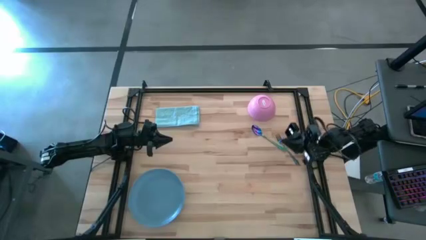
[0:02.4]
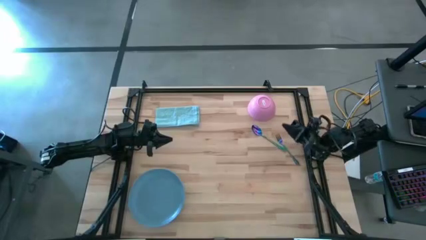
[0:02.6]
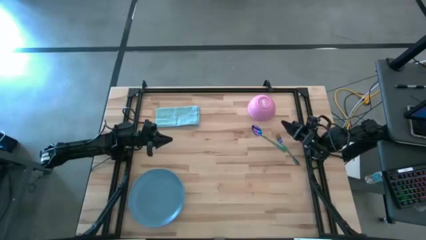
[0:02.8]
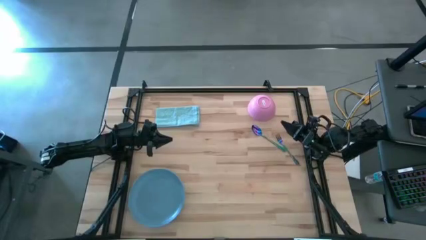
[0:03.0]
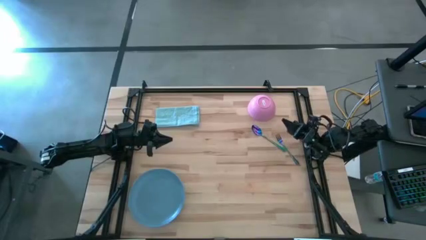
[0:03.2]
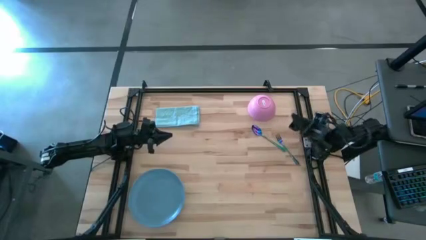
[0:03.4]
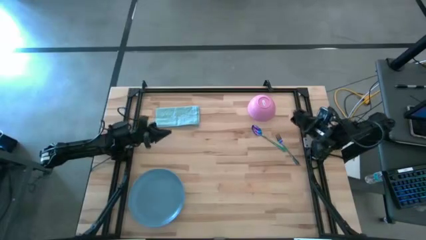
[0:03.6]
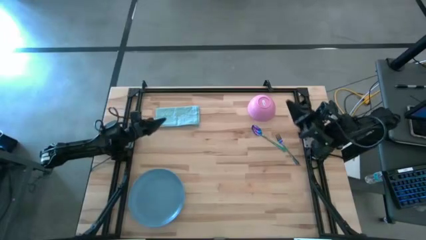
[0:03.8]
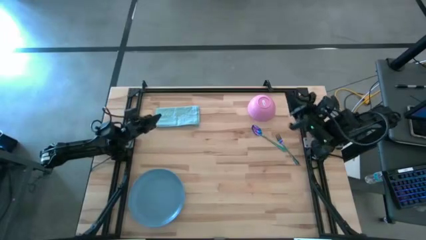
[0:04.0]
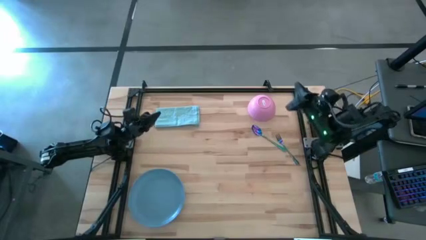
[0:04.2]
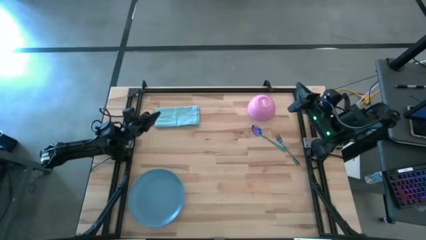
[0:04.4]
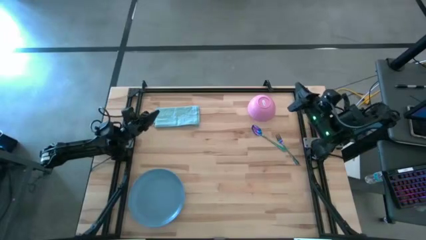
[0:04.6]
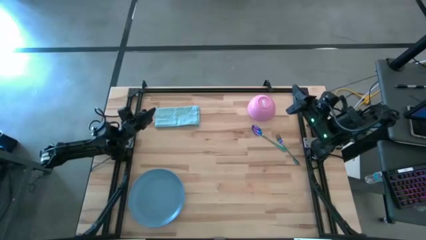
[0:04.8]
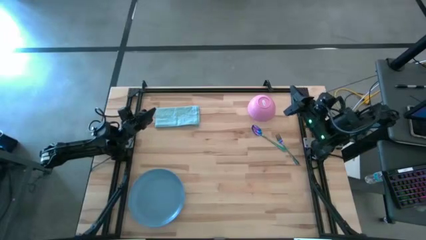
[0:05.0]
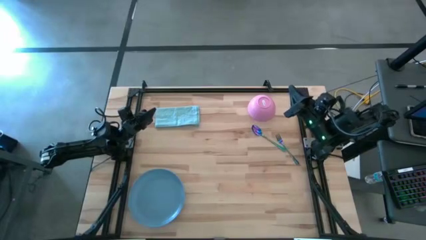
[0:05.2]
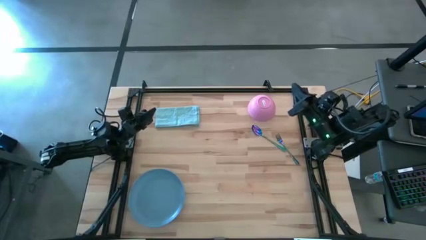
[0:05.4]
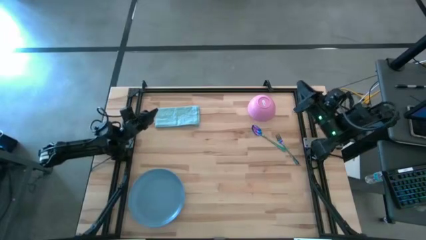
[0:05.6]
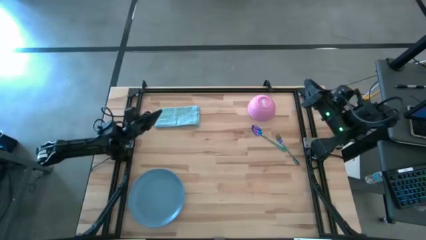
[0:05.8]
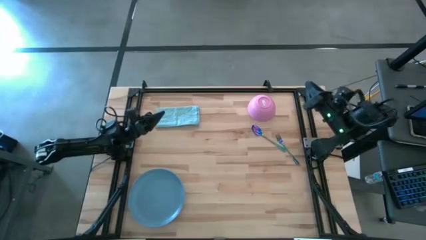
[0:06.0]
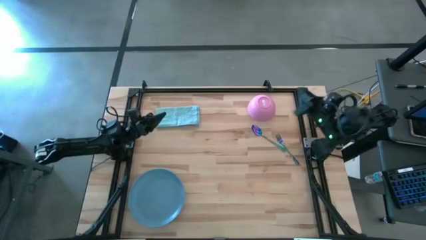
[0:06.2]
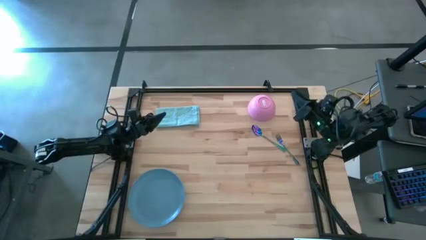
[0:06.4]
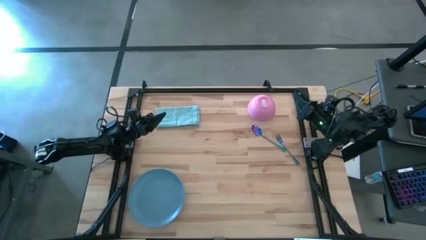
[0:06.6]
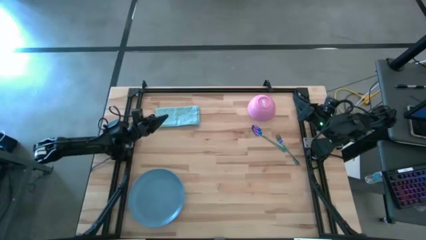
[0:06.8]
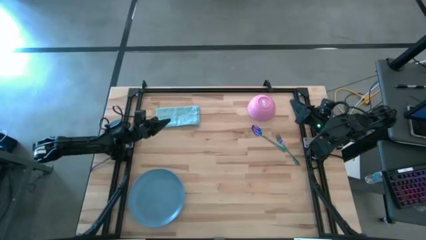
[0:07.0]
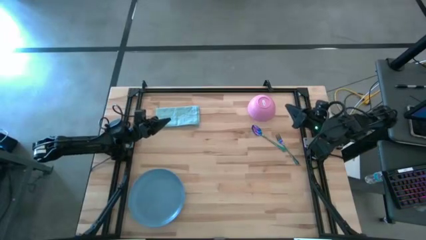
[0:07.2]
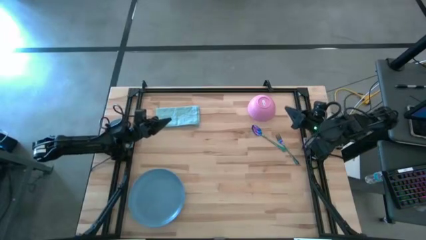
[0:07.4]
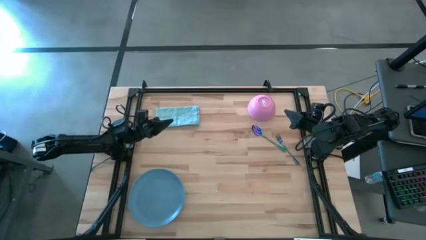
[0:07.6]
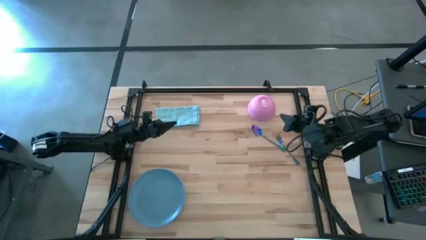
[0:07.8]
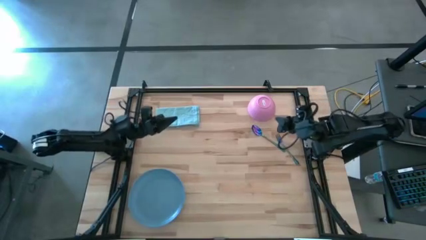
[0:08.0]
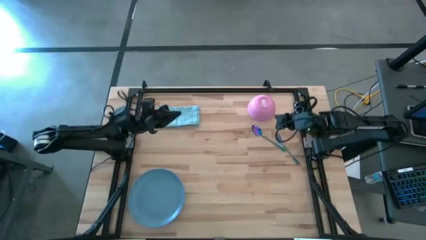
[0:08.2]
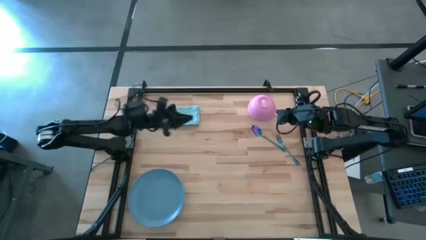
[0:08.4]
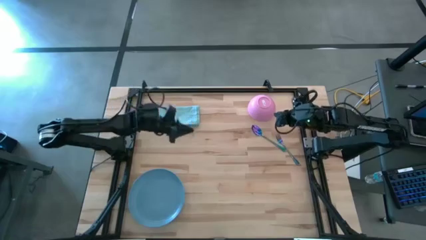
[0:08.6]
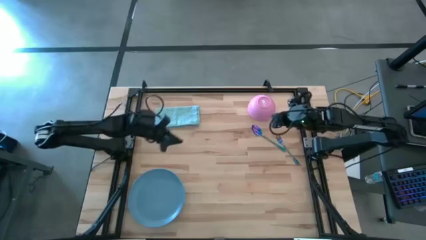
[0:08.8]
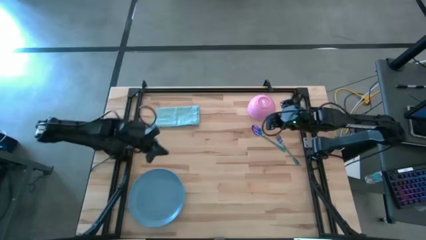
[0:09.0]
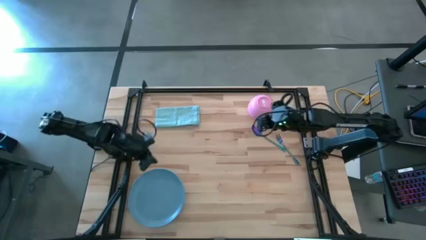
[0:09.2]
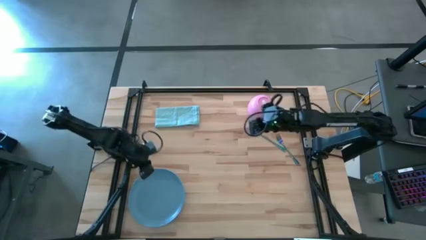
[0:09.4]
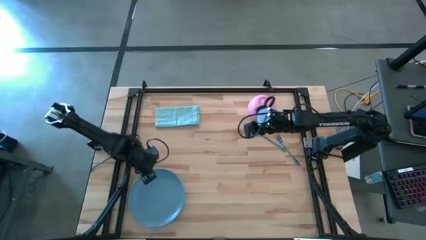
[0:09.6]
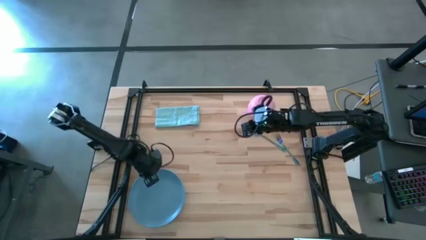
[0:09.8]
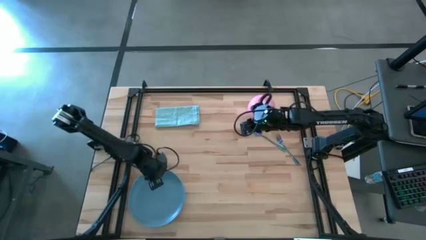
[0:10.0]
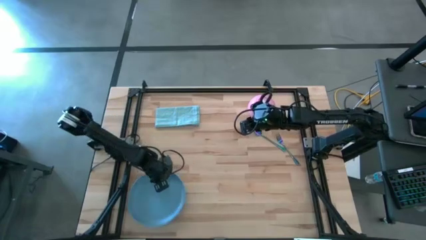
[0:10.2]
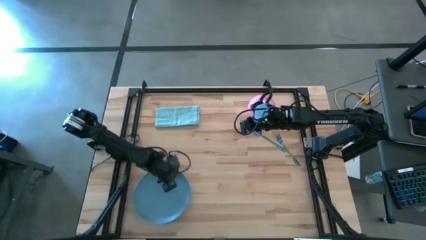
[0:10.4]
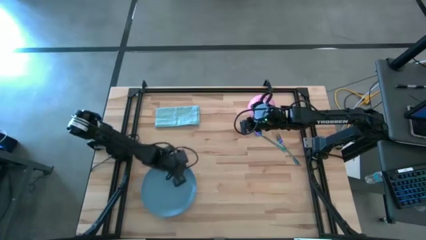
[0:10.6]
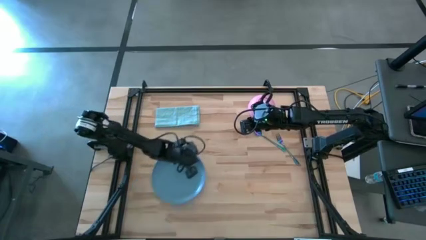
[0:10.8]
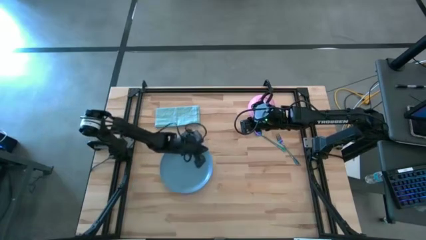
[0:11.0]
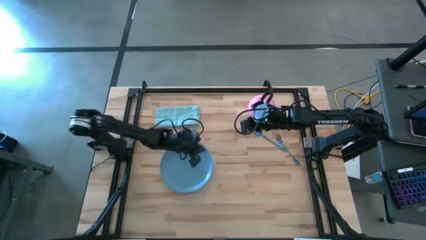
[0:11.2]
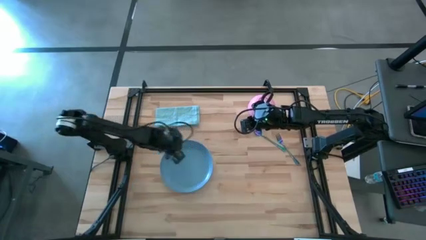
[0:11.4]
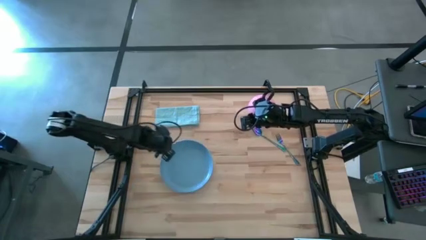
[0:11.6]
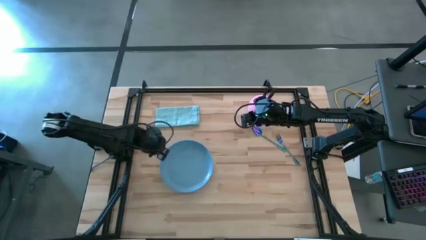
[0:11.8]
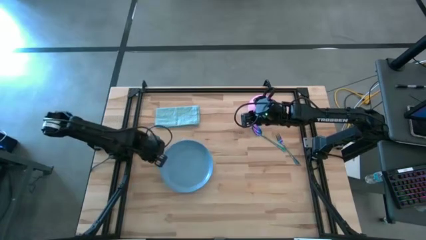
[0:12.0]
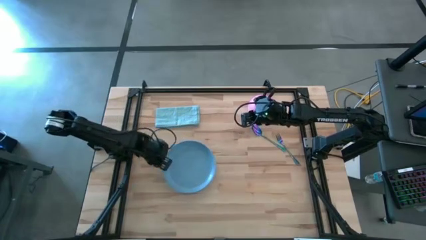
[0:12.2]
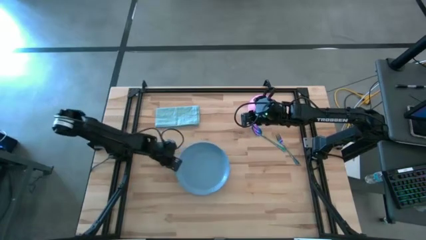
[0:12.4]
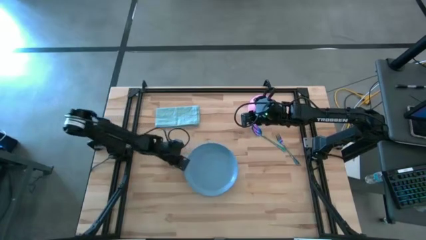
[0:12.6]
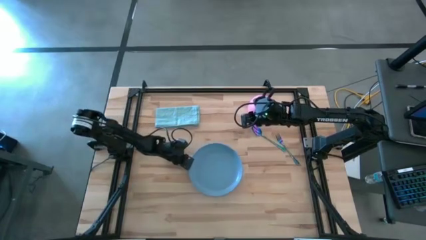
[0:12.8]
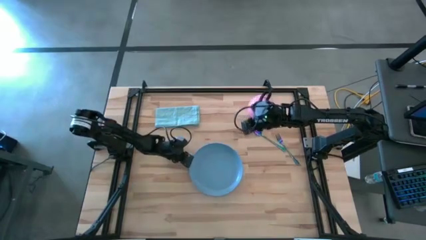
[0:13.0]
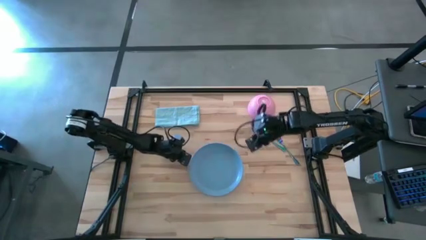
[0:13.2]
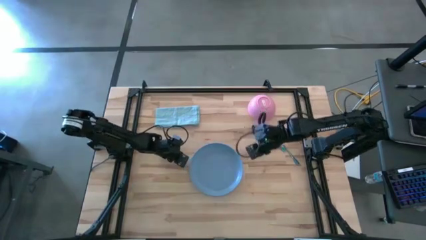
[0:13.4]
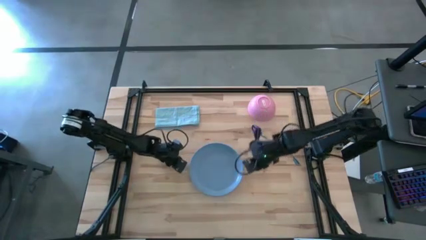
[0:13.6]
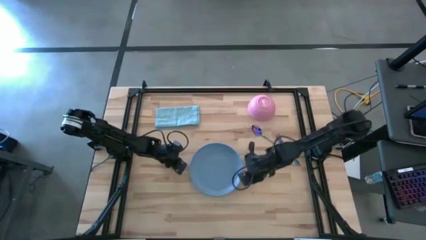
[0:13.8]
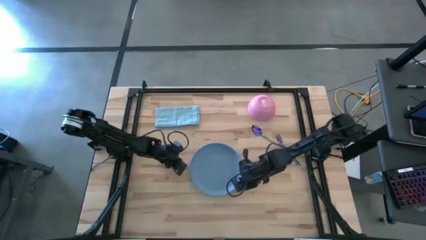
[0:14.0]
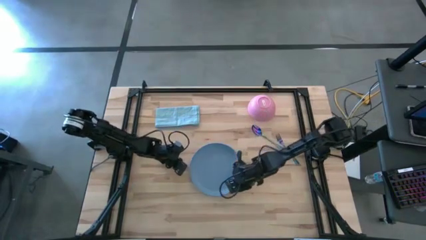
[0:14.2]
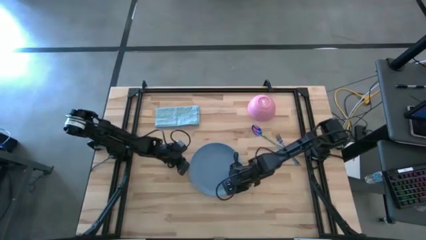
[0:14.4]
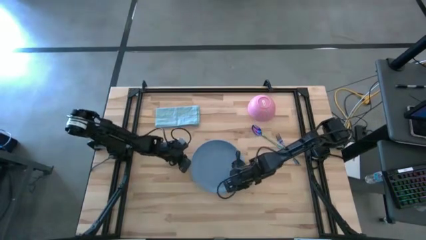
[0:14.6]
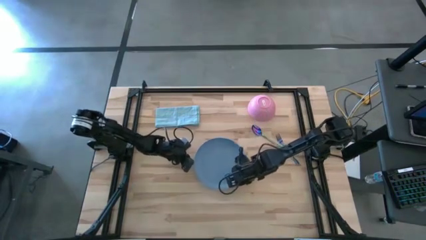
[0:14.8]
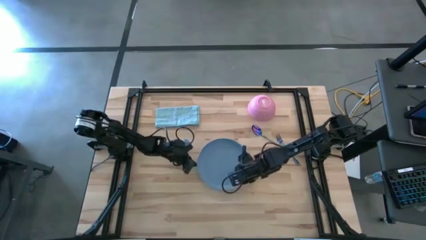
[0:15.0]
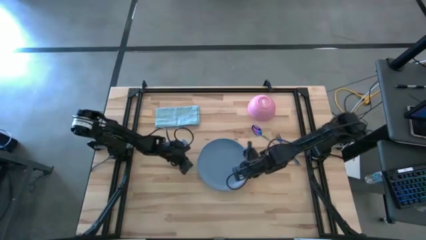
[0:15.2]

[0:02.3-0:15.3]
Task: Set table place
Move the blue plate to the center of the table

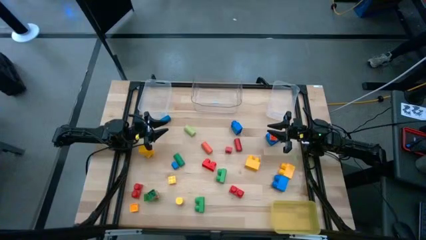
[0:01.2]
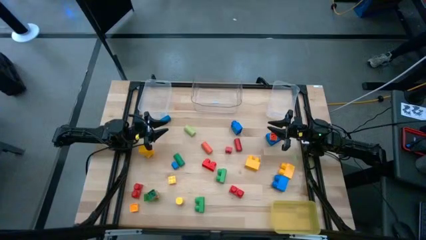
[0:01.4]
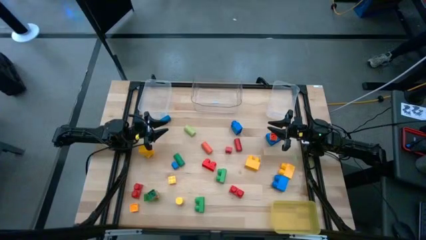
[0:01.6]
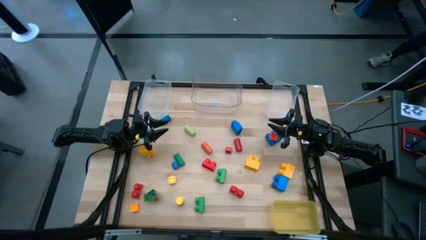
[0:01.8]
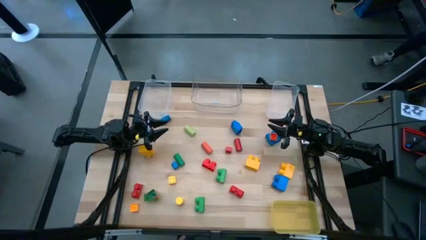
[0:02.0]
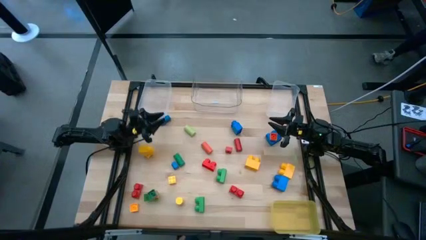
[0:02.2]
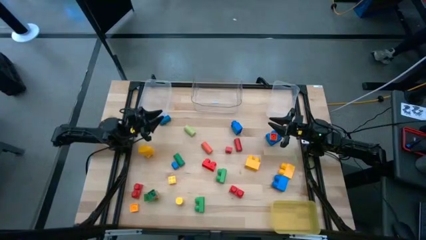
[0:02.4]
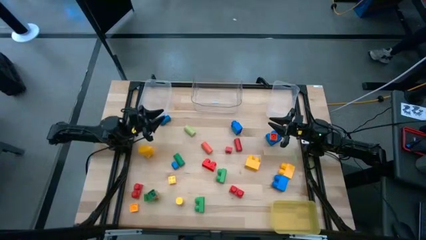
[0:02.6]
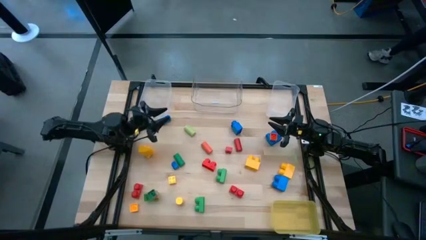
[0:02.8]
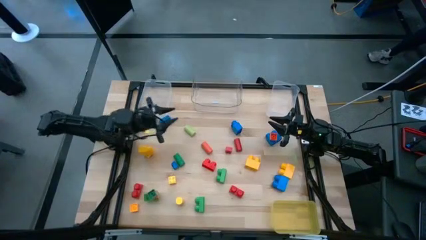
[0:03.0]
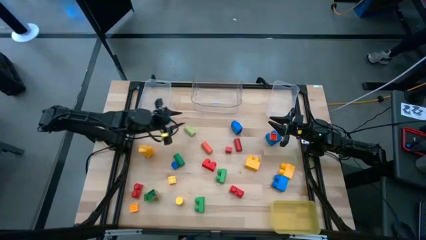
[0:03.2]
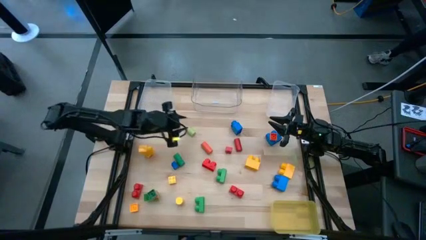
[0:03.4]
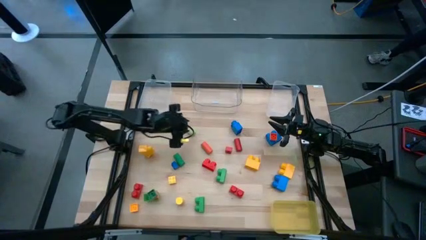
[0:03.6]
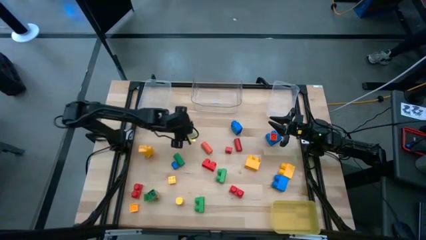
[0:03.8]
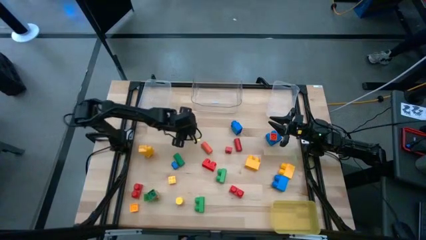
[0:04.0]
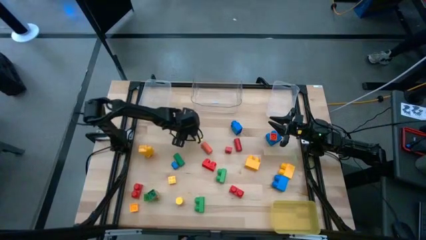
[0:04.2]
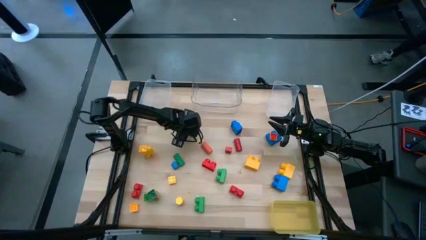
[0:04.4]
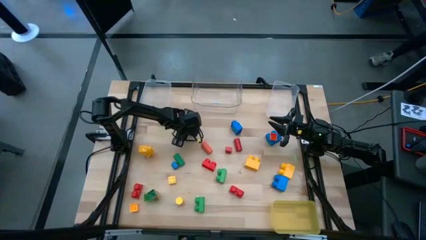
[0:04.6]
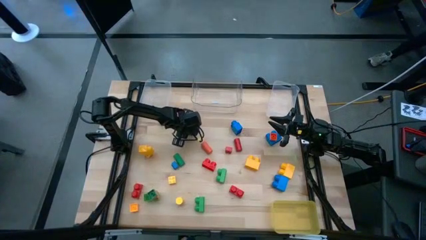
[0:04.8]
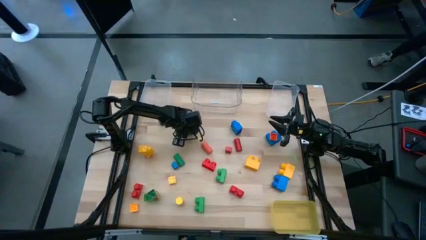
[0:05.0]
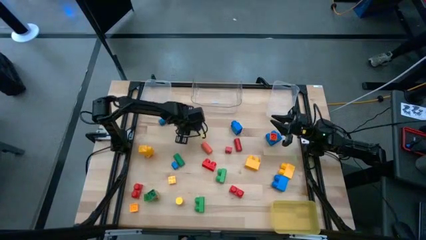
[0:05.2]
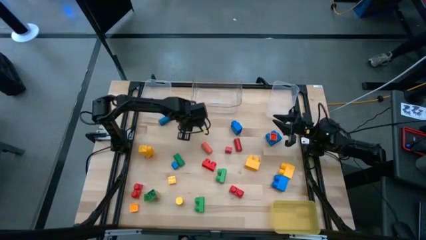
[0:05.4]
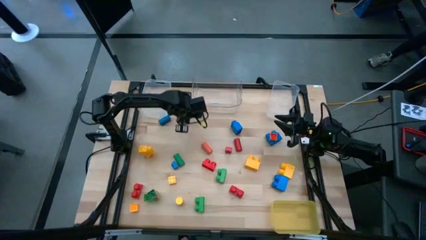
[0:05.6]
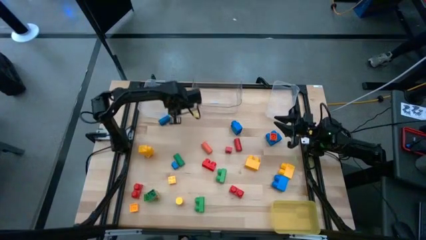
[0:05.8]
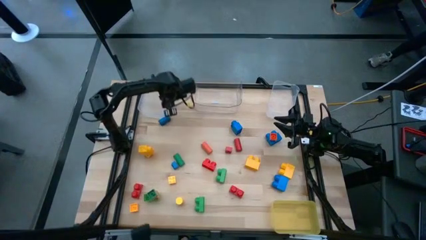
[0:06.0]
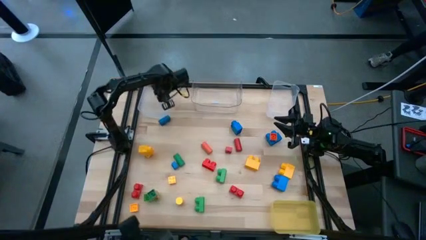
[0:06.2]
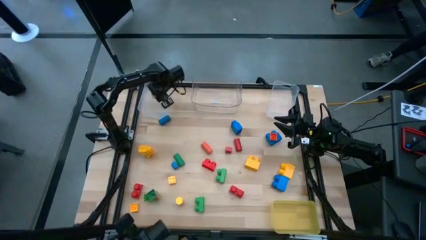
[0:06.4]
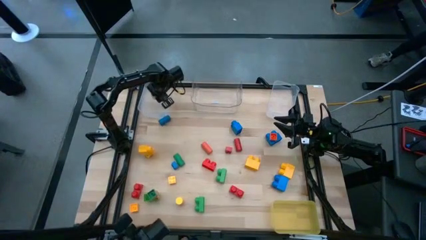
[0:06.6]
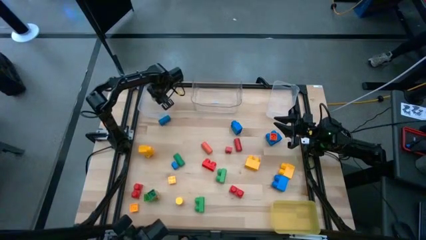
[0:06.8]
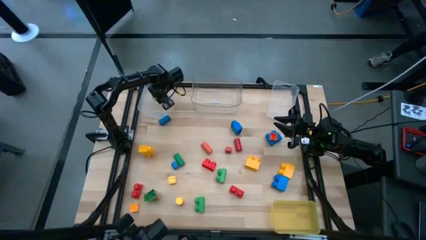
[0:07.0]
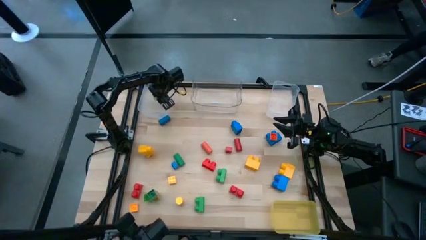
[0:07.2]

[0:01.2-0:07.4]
Task: Sort blocks by size
Put the light green cylindrical wooden block into the left transparent bin
